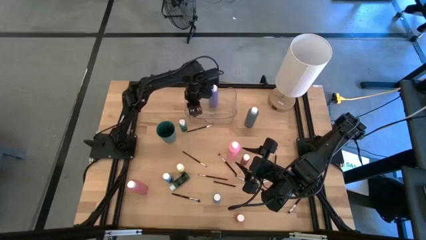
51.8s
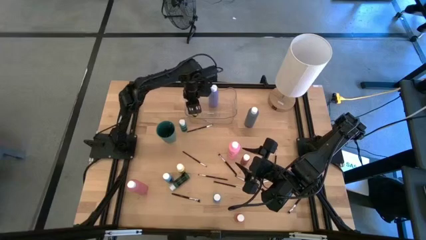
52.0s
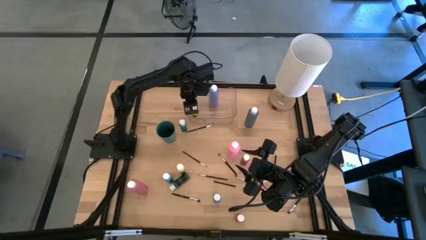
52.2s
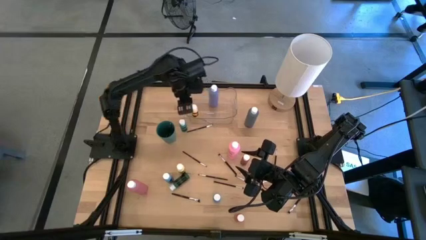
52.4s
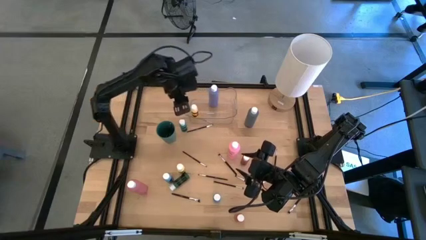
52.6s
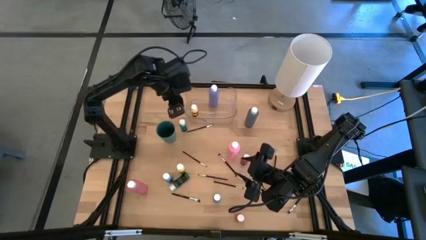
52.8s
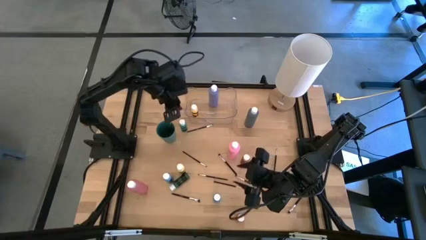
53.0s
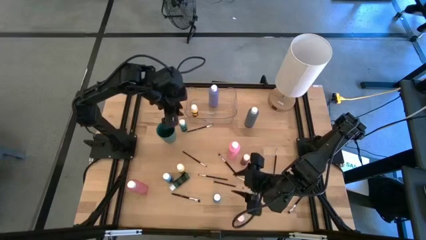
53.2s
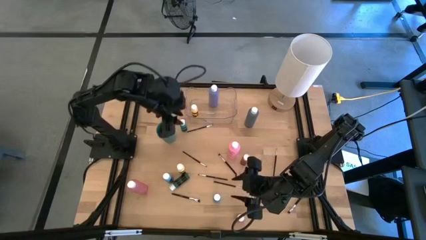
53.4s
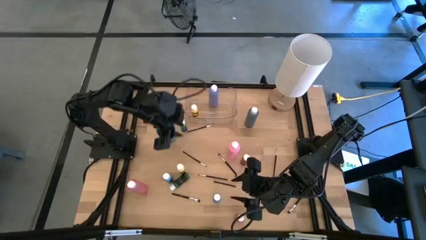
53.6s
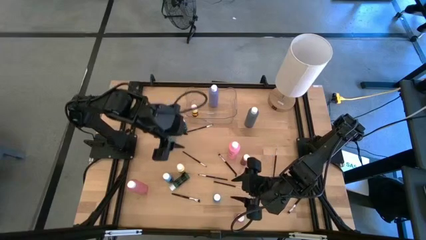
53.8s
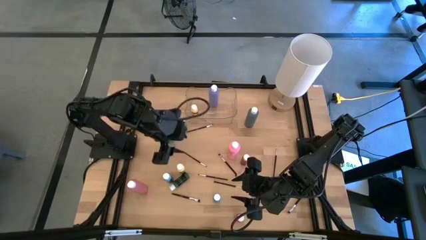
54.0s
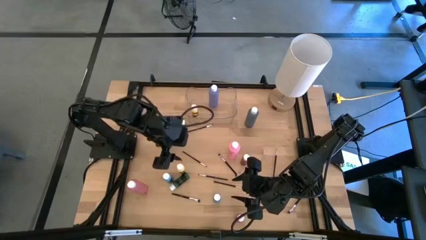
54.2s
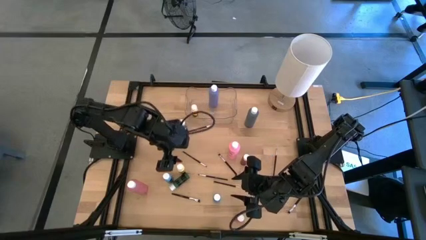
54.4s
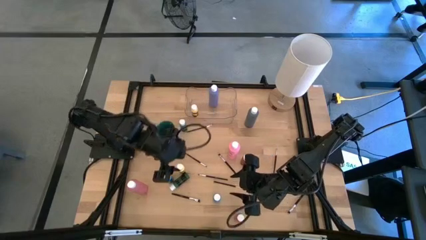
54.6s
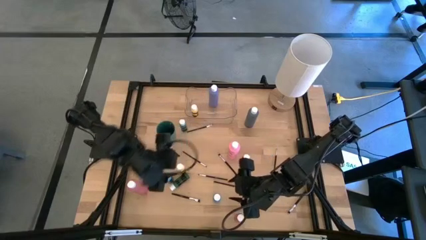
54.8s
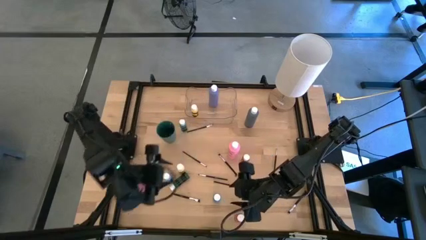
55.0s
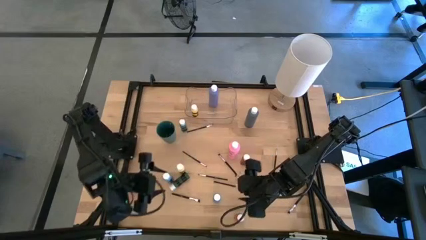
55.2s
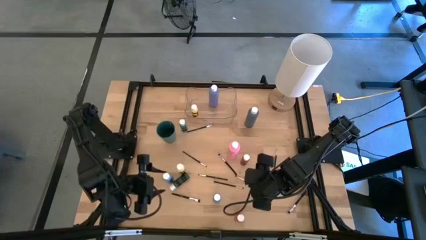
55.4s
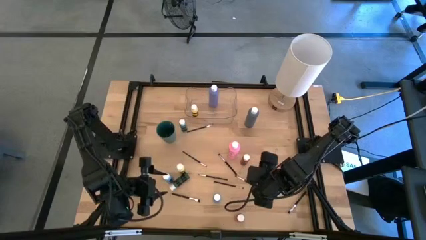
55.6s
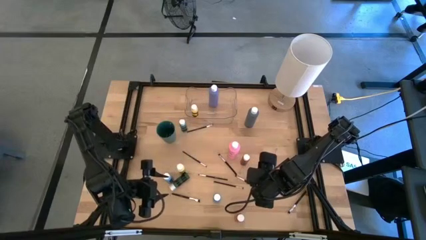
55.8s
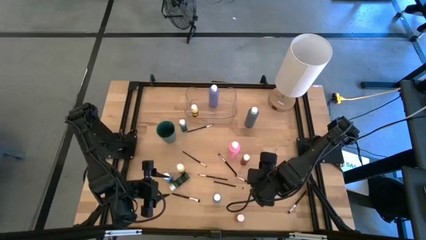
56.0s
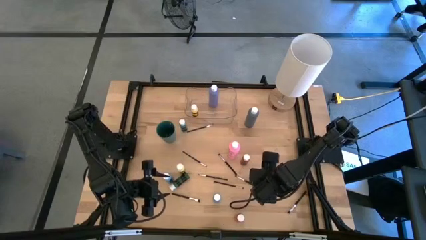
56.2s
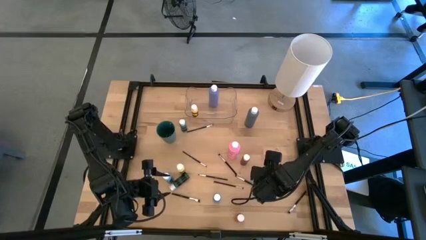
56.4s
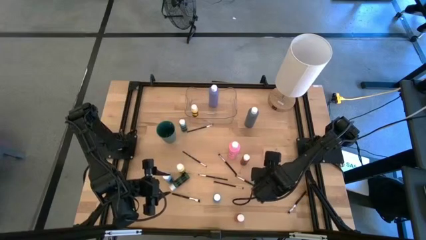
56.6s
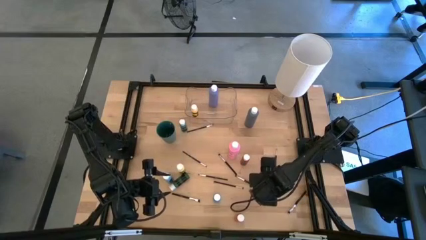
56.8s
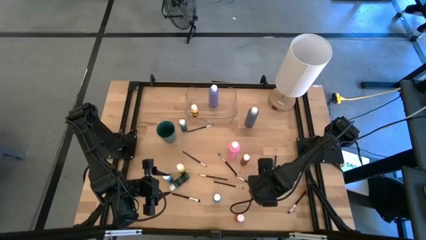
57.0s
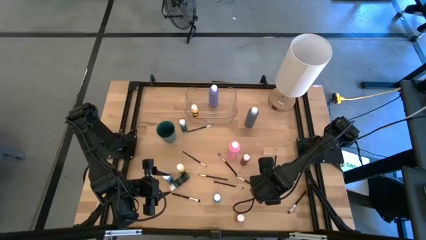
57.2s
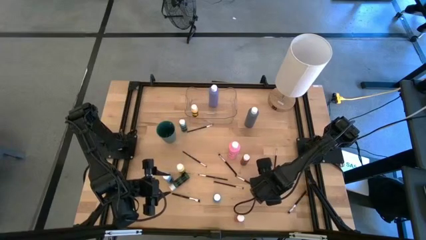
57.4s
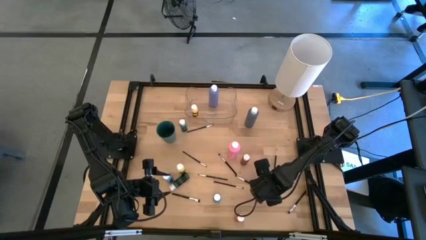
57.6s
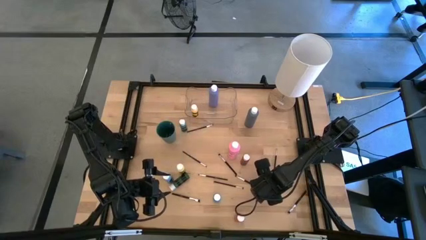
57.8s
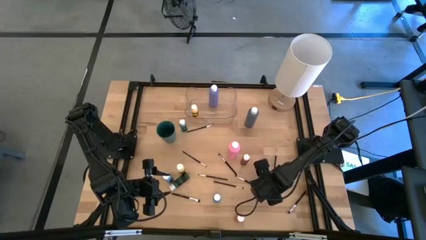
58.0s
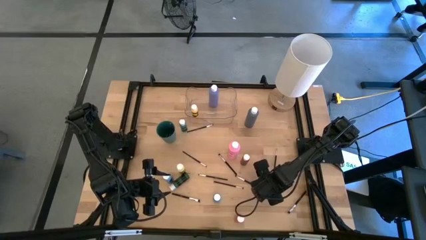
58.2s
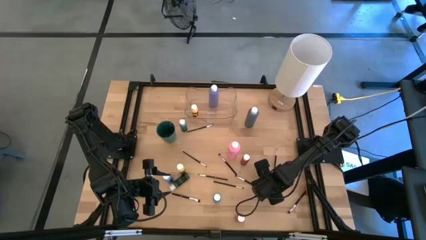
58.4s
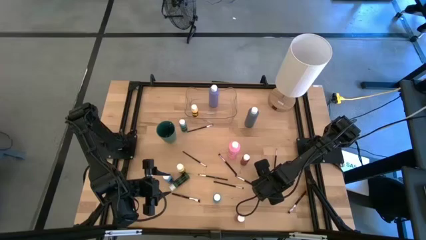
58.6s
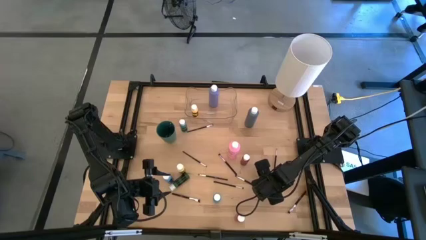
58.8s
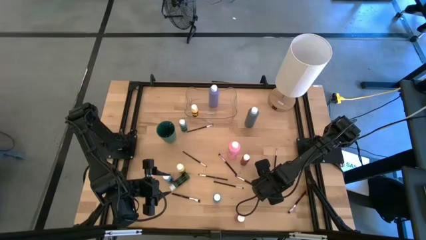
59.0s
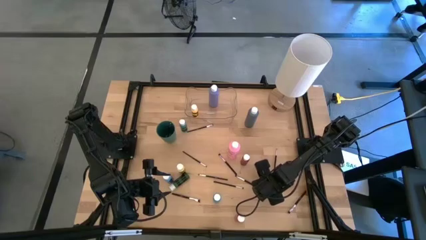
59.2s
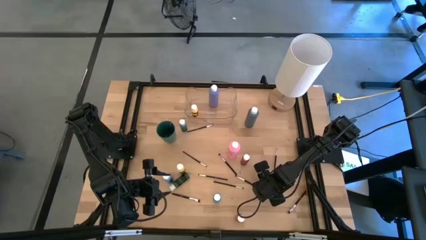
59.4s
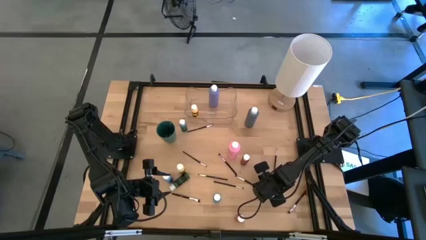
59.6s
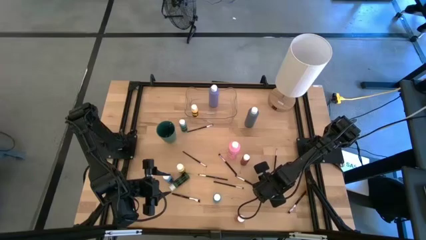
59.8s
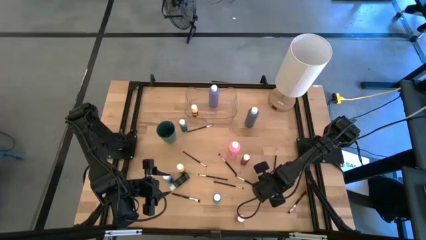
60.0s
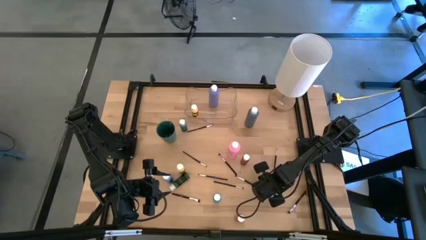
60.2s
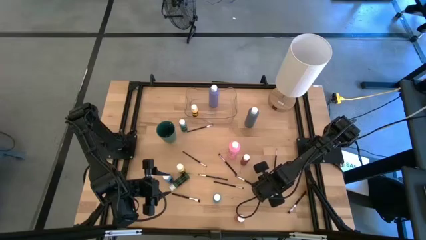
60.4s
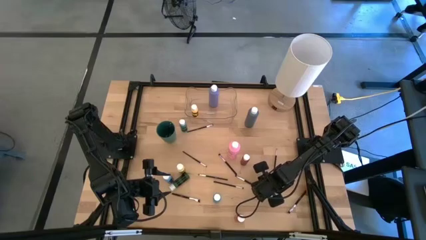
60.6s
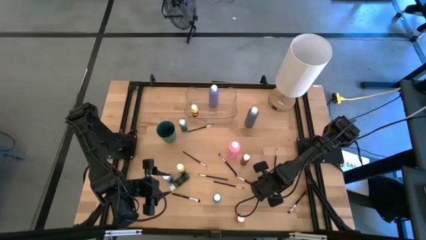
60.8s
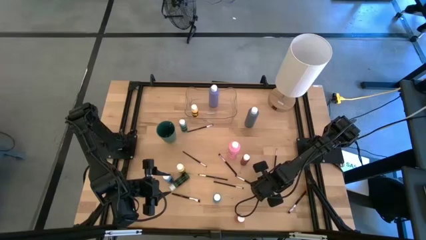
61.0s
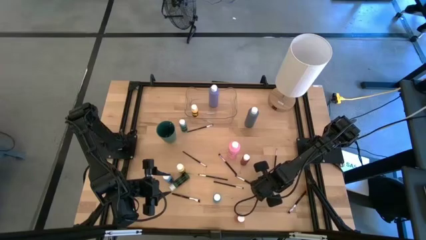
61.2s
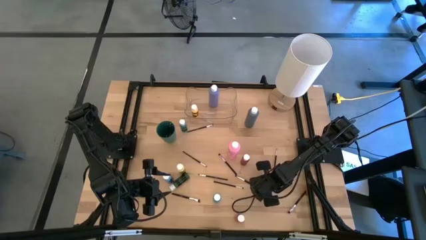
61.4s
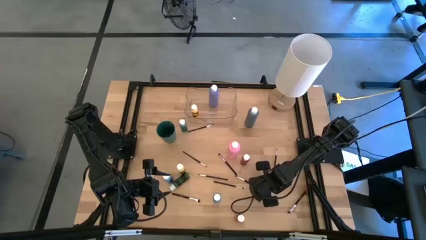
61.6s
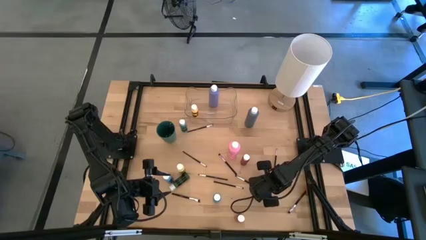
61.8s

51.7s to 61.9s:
Task: Pick & Place Paint Supplies
Put the black paint brush into the green cup

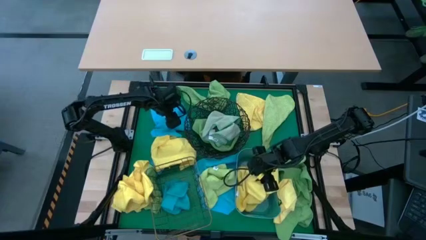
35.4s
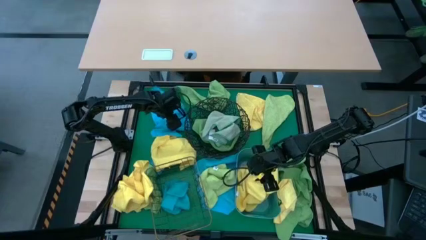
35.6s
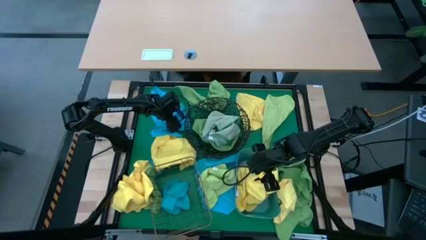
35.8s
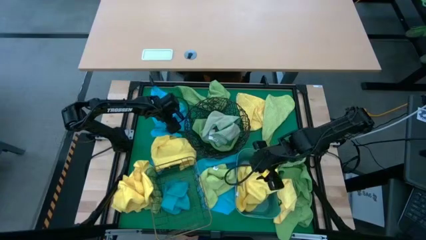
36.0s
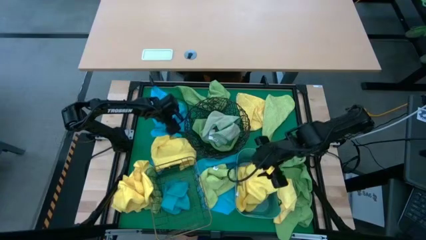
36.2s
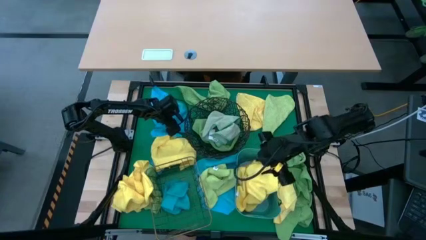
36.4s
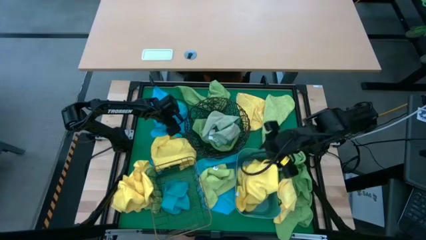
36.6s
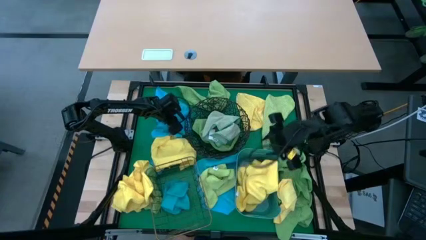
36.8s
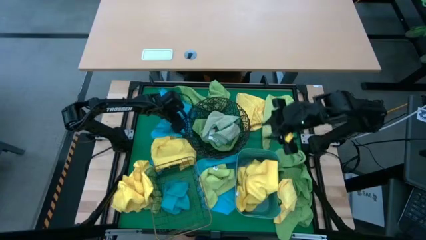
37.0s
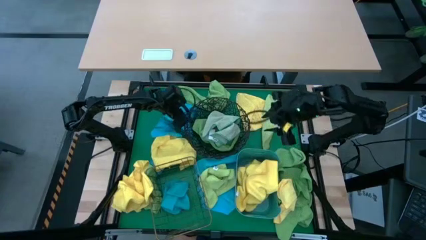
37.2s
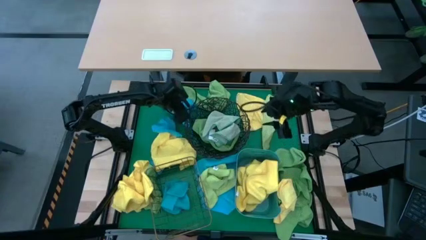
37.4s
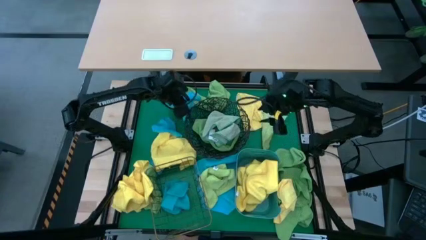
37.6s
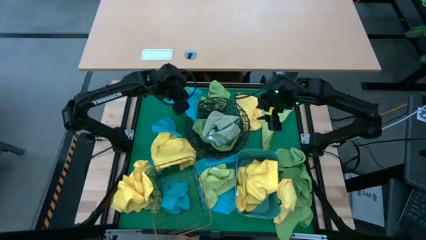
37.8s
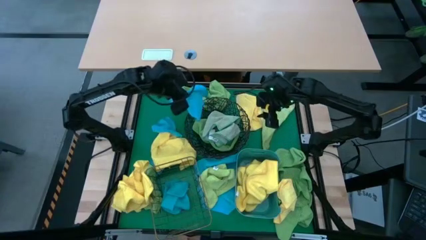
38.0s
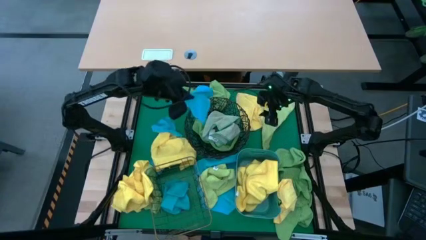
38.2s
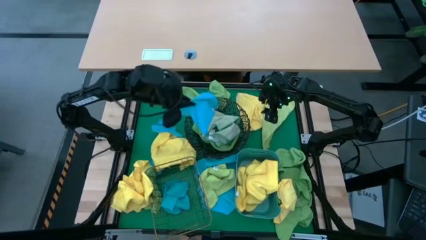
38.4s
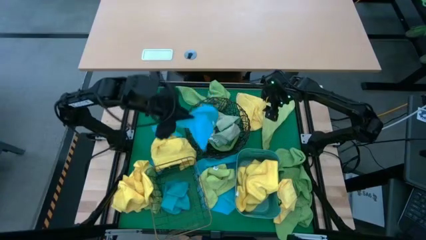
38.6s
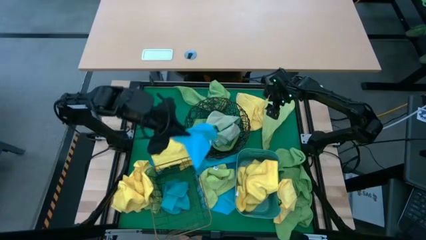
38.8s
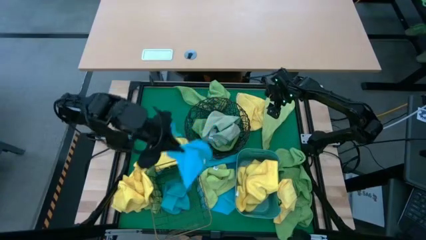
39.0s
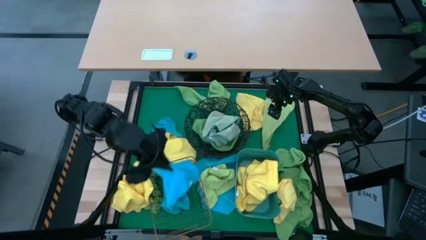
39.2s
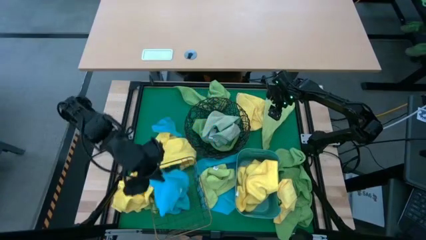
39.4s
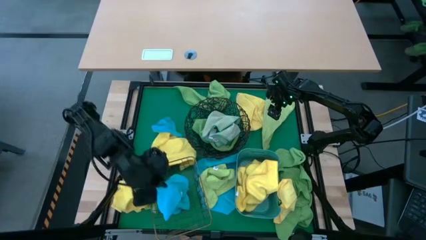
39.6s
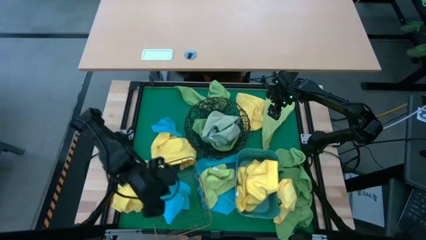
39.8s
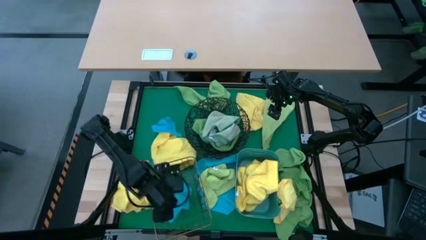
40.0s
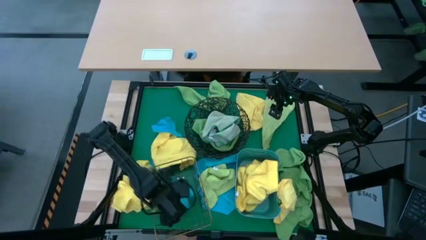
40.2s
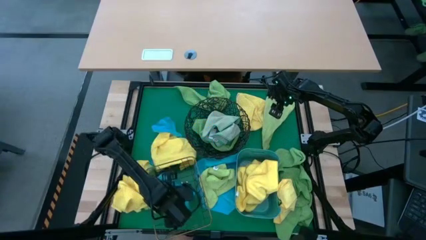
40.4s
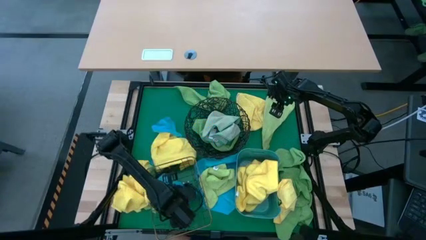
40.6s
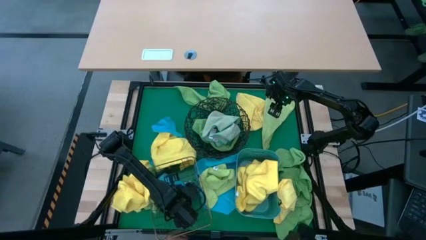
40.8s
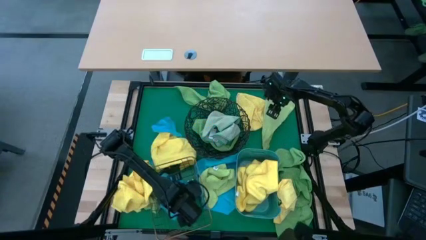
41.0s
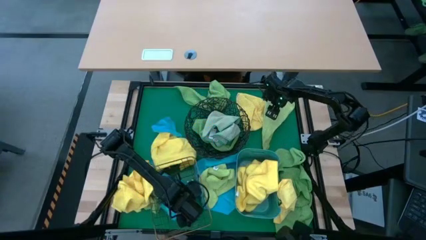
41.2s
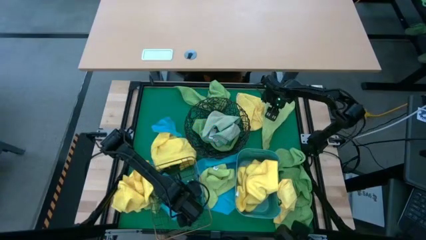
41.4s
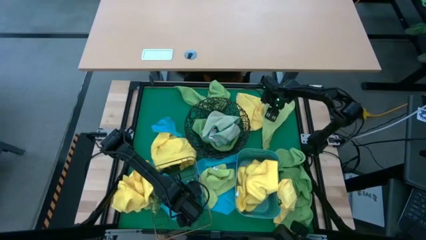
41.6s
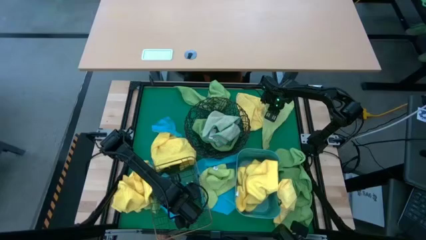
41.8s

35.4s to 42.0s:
Task: Sort microfiber towel by color & place in baskets
Put the blue microfiber cloth into the wire basket
